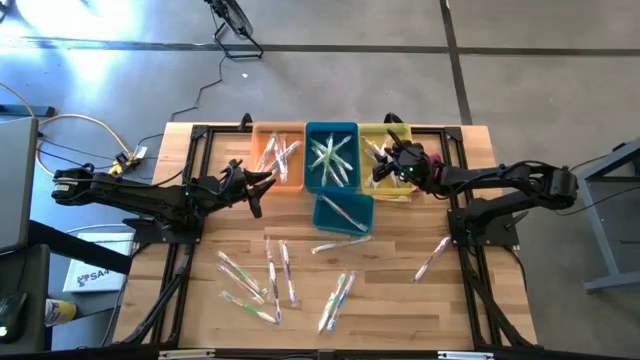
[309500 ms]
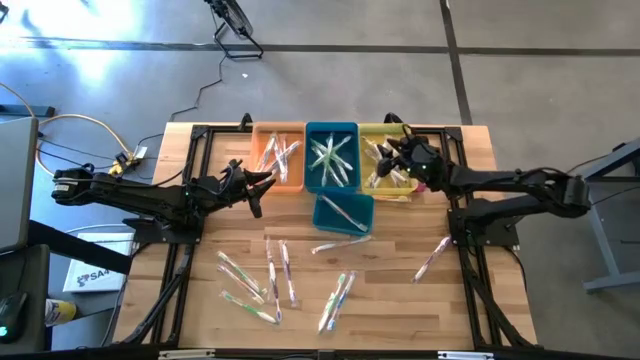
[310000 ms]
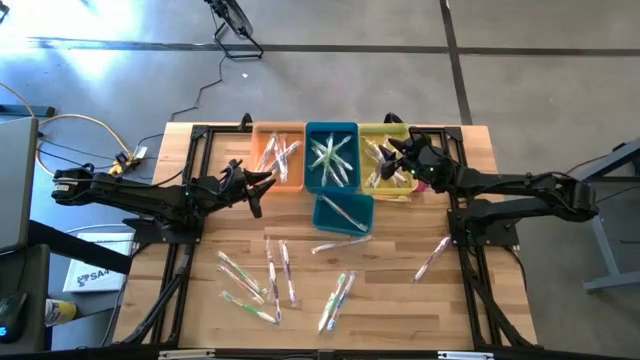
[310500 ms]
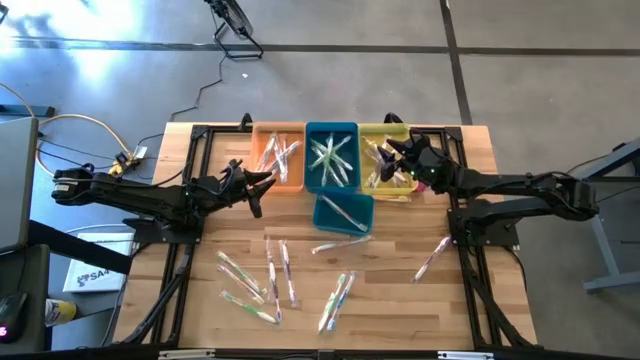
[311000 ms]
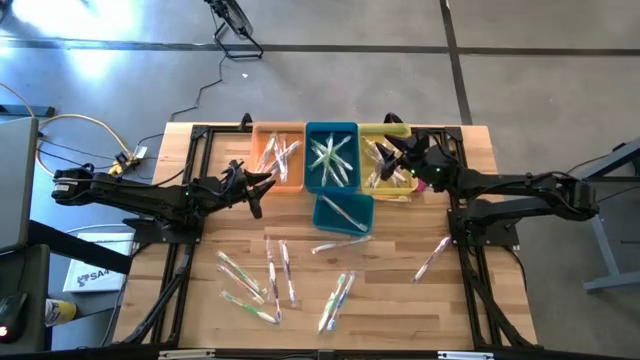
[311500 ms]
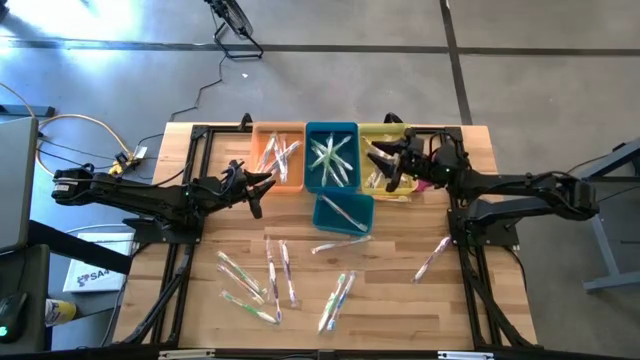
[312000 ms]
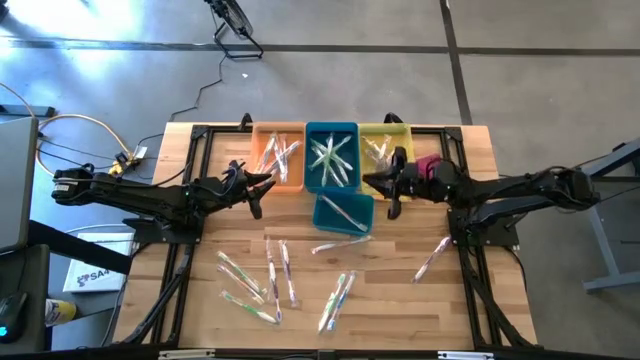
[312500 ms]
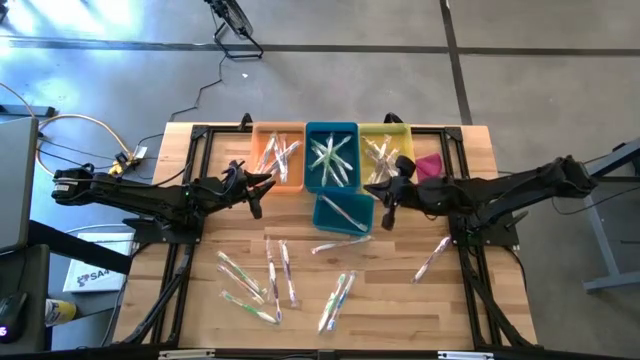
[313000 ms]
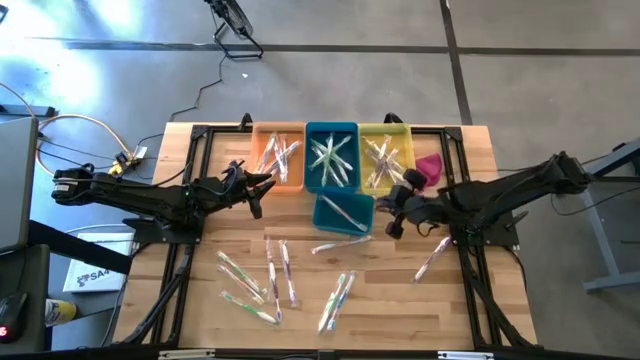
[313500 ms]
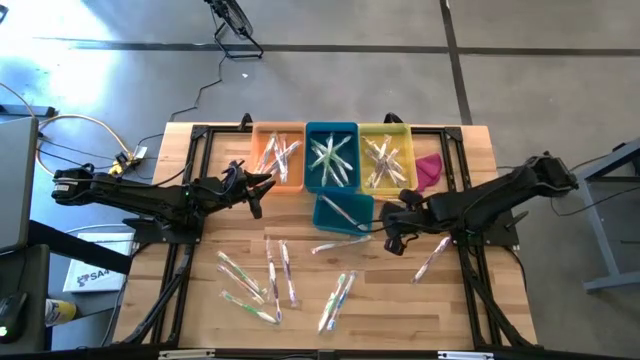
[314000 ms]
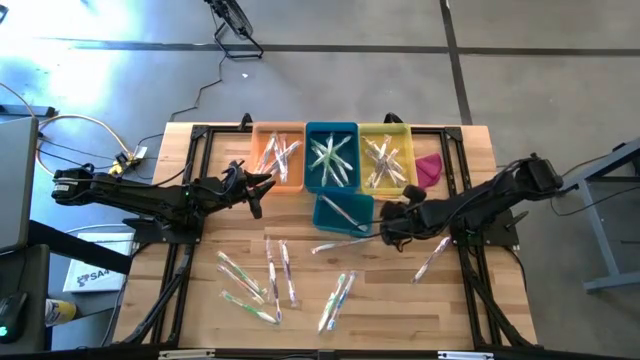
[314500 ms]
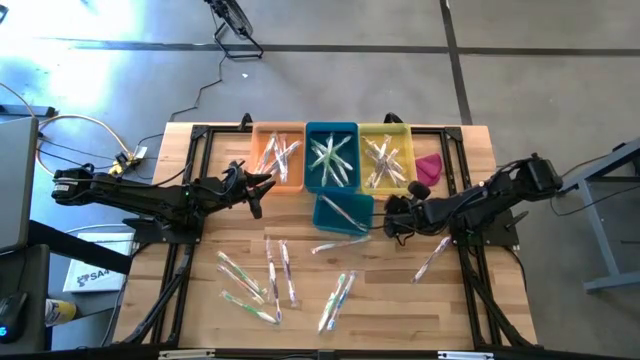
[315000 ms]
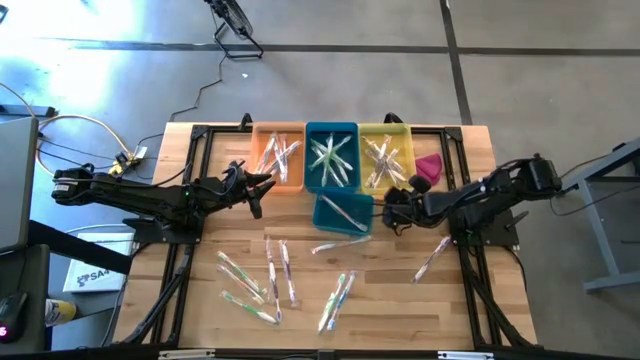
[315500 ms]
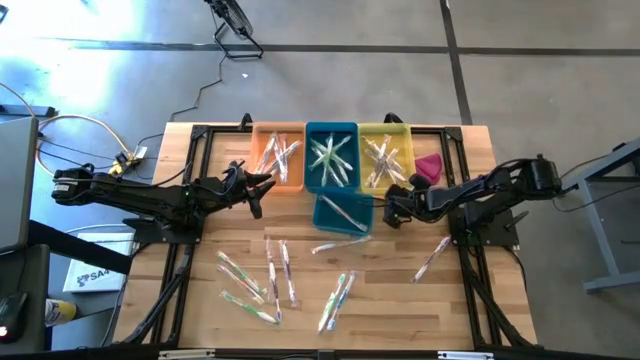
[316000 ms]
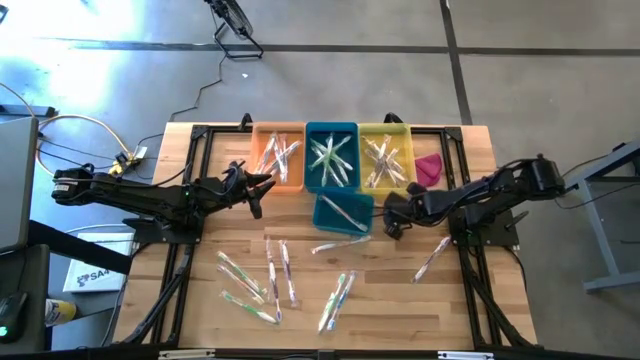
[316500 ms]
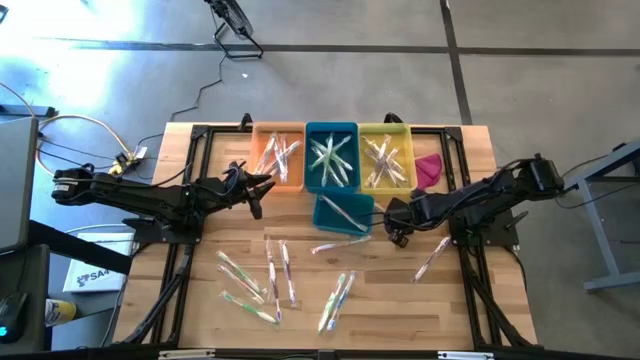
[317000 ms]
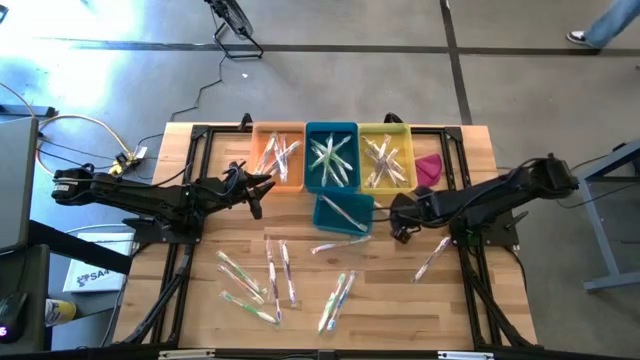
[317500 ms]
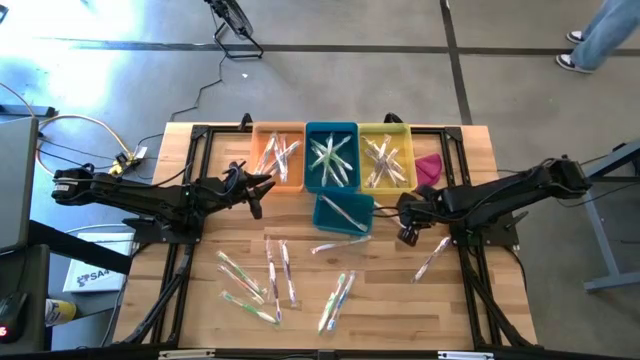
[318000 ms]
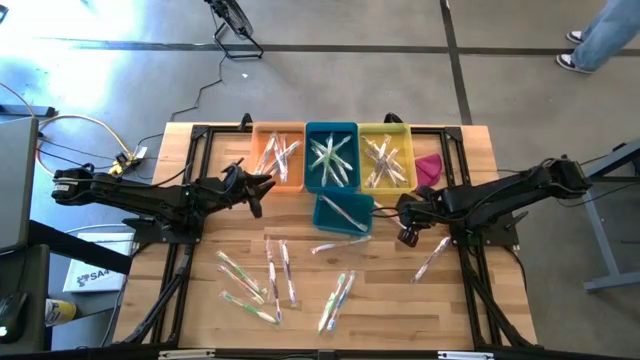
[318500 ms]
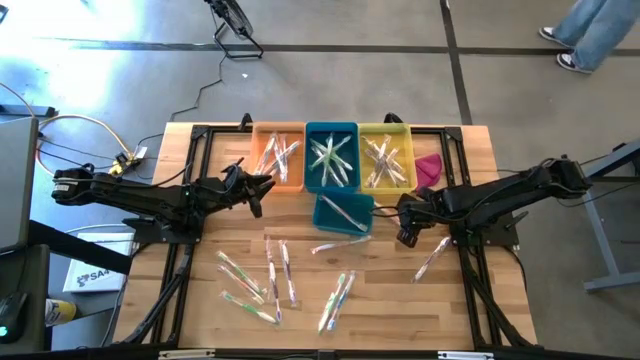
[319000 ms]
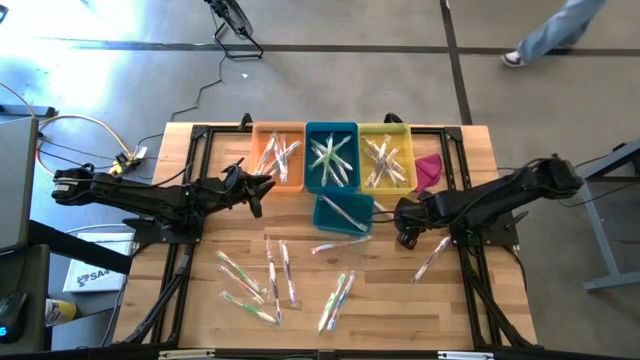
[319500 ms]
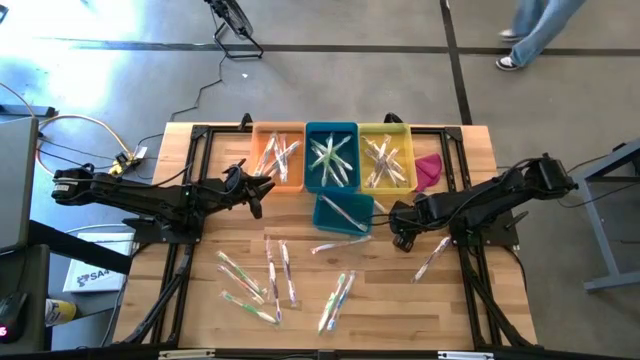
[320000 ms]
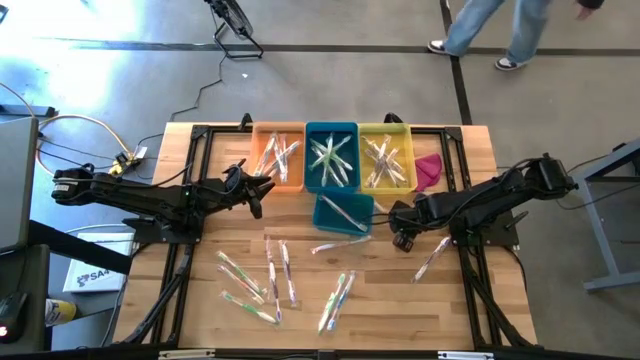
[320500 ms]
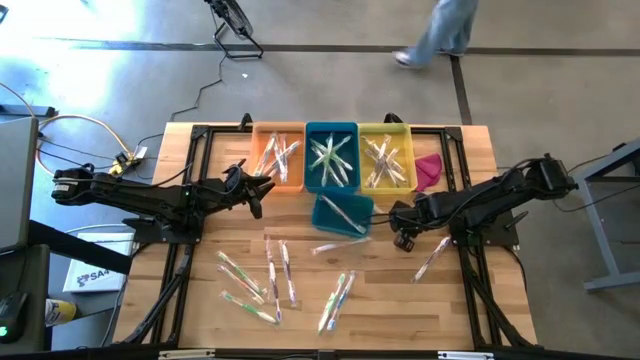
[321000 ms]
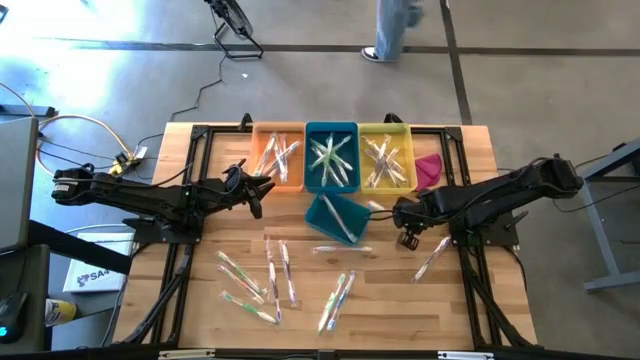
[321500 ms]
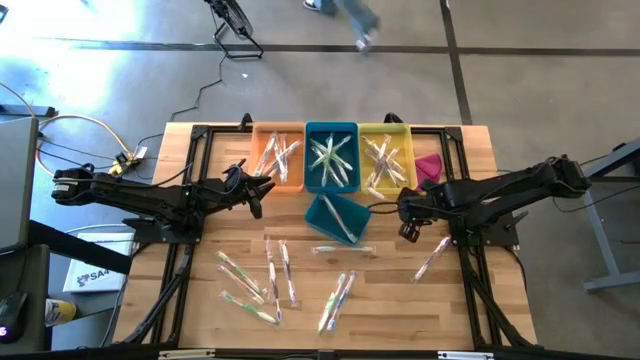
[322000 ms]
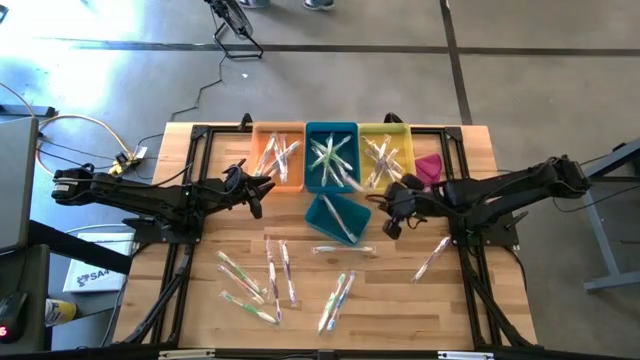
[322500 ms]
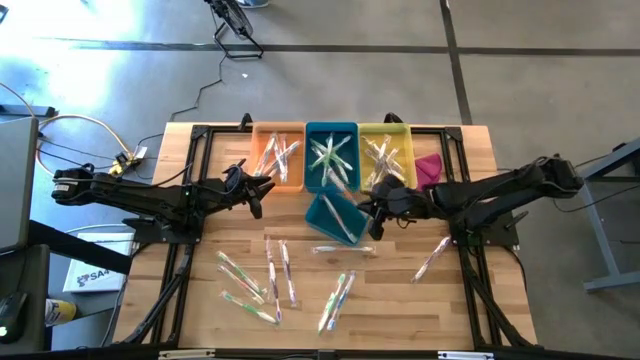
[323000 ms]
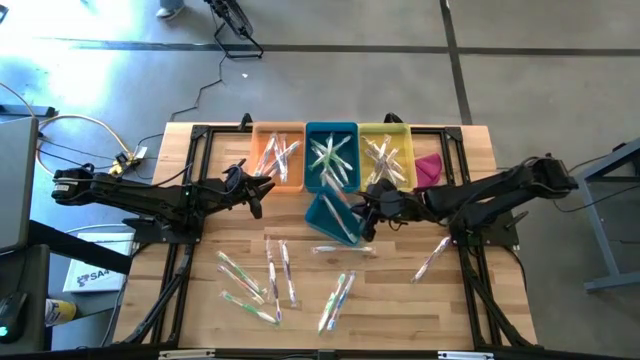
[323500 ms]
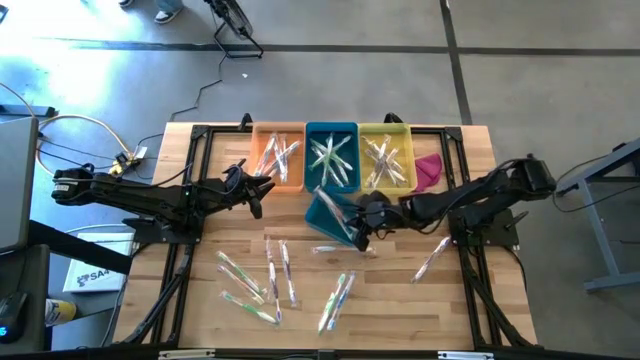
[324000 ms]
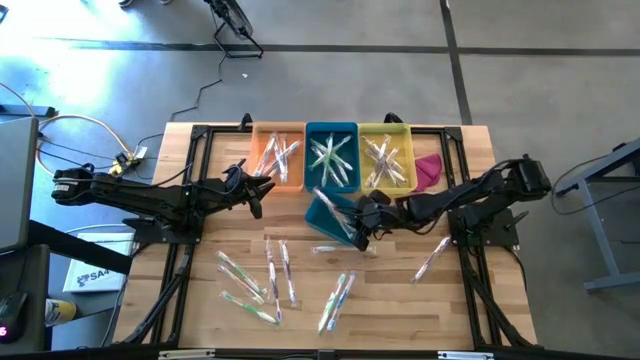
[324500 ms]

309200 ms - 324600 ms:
Task: Pick & Place Toothbrushes
Put the orange toothbrush into the bottom blue bin

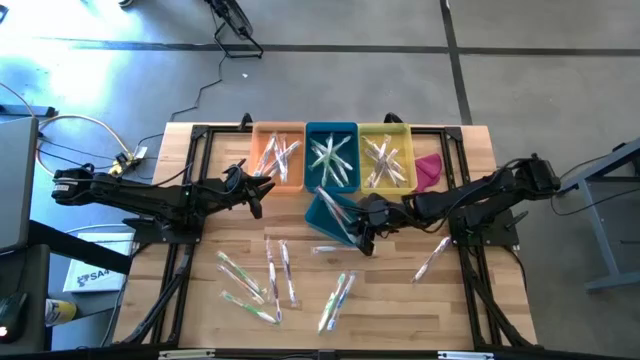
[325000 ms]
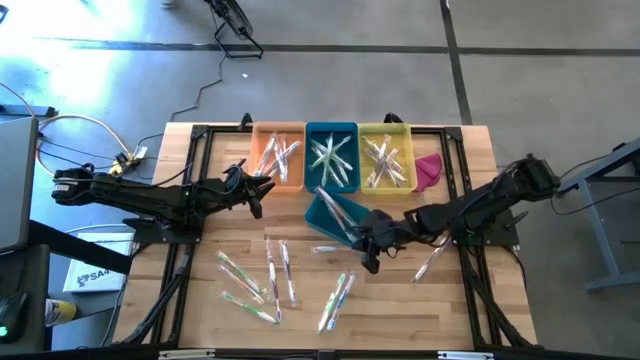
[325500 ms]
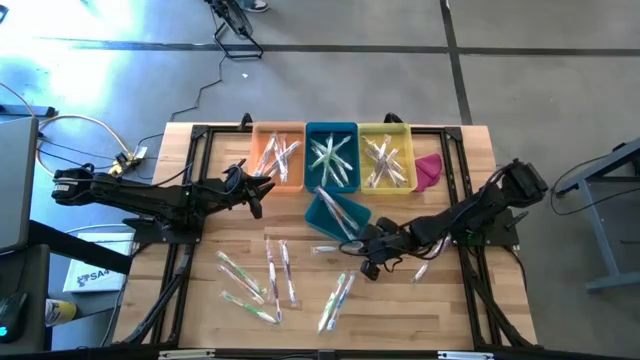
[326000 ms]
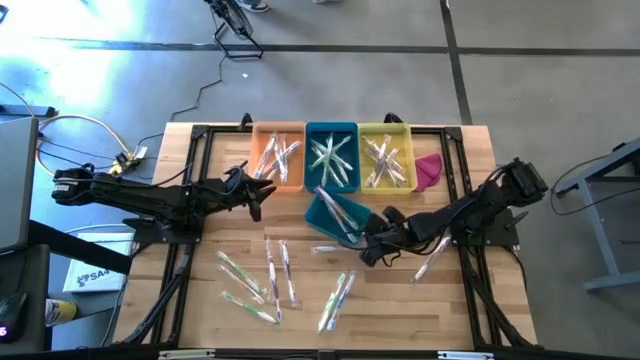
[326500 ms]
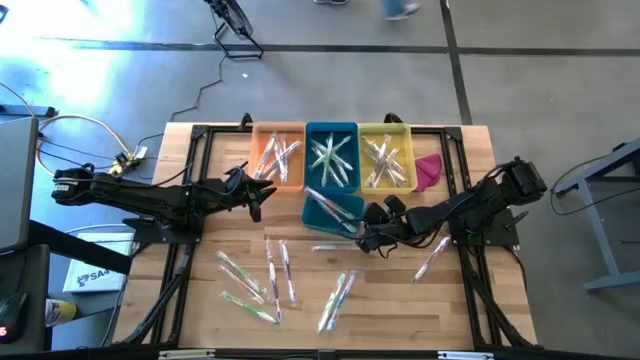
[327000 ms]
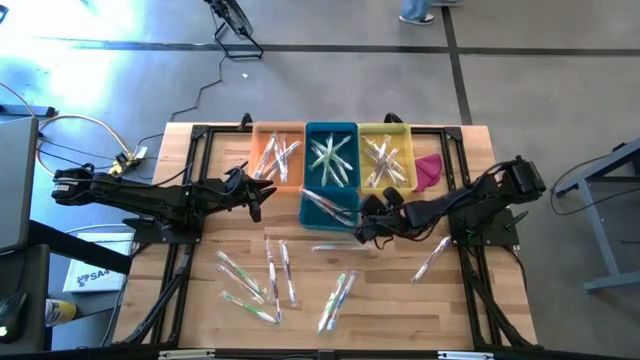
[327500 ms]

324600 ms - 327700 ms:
Adjust the bottom blue bin

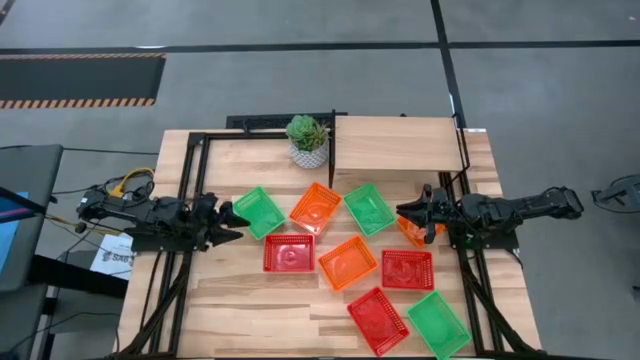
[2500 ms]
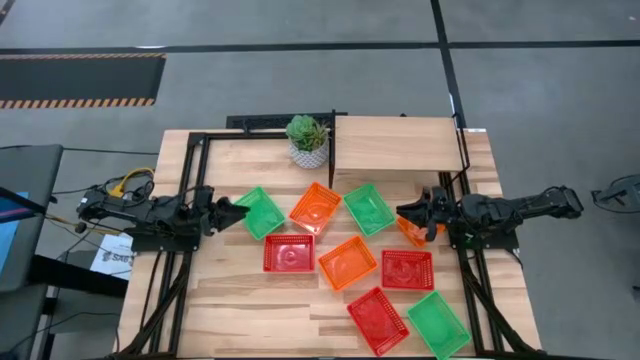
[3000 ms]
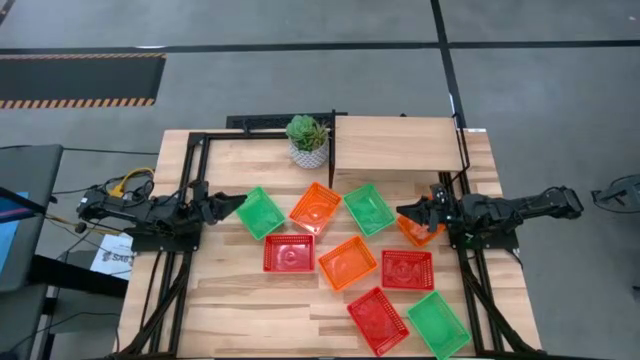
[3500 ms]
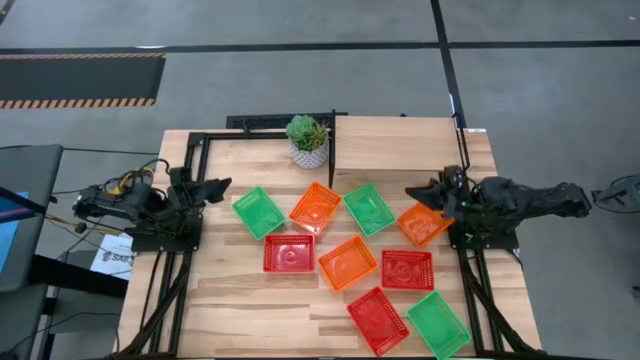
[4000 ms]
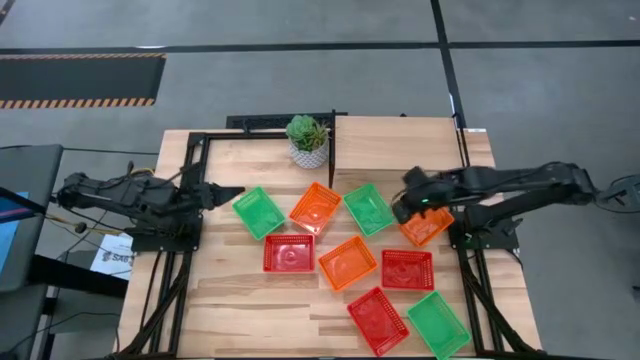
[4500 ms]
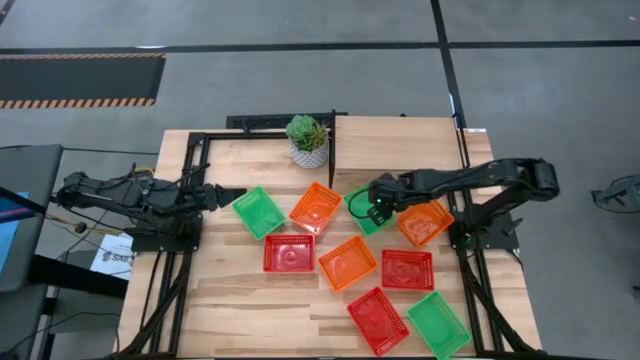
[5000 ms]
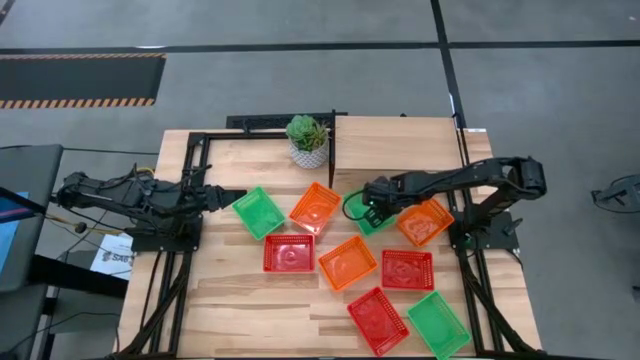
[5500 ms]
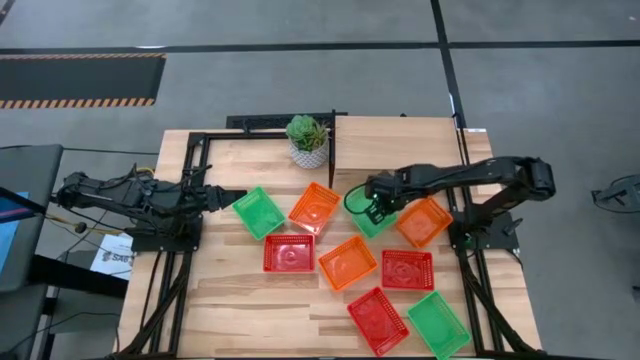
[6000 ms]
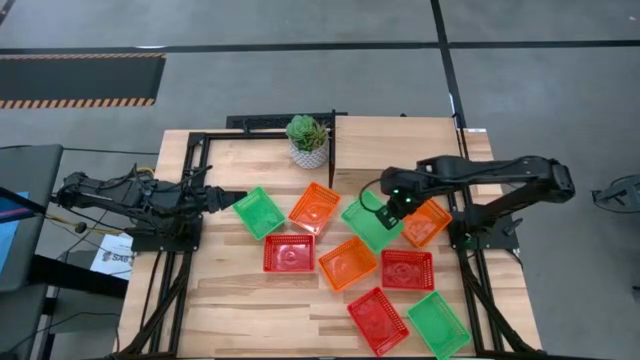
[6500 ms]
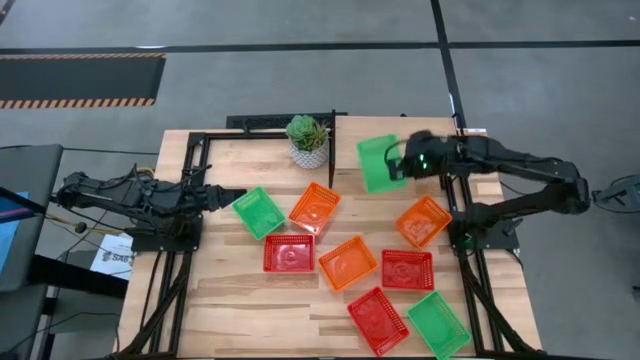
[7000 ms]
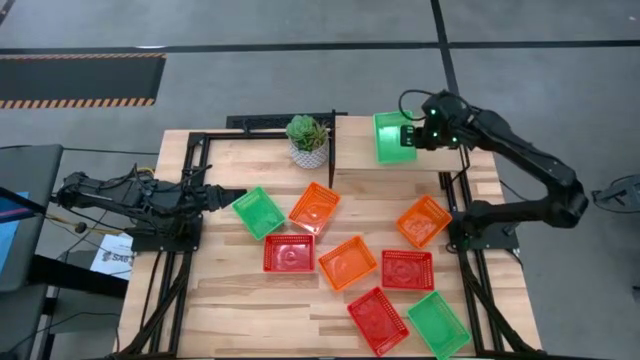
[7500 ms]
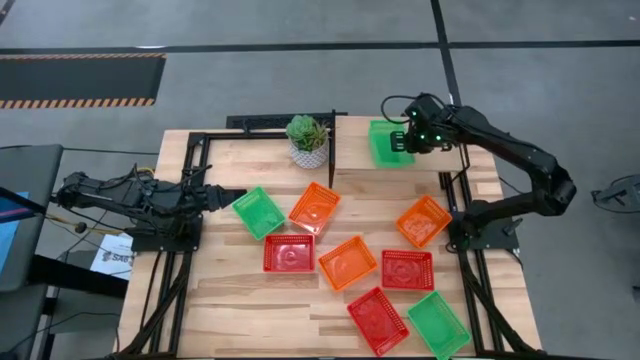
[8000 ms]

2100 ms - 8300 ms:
Task: Stack baskets on shelf by color
Put the top right green bin on the shelf
